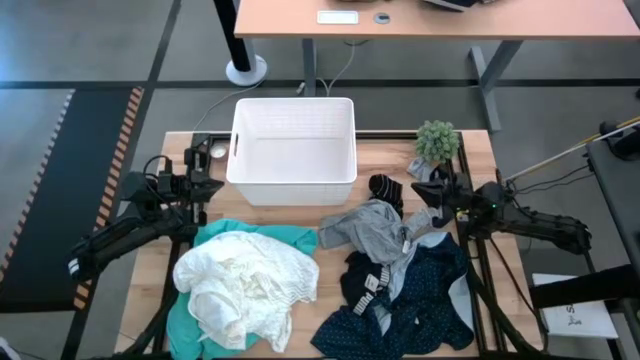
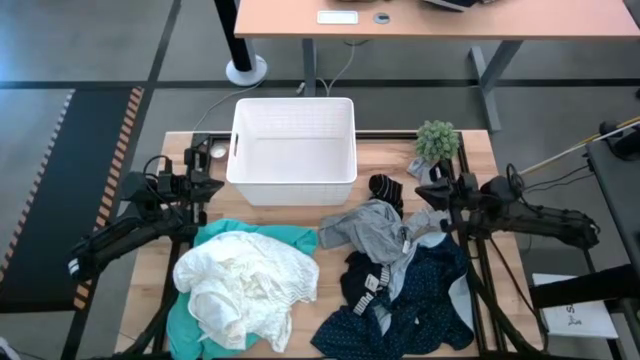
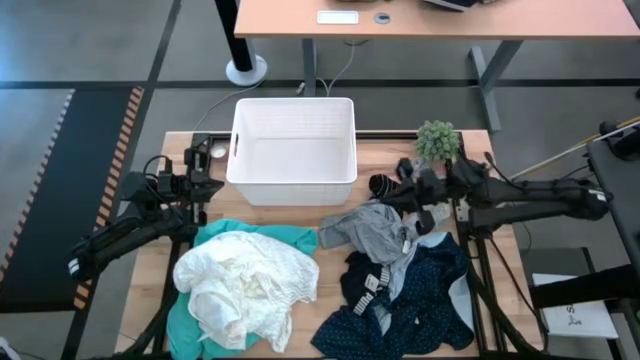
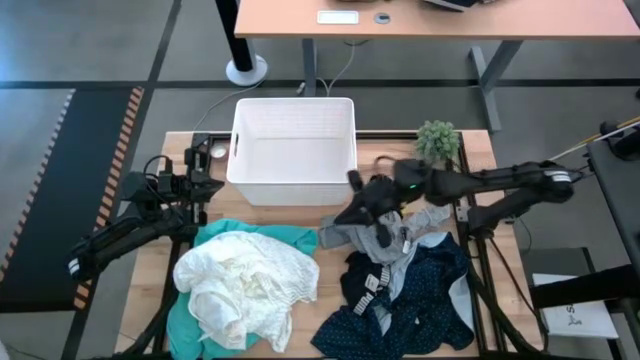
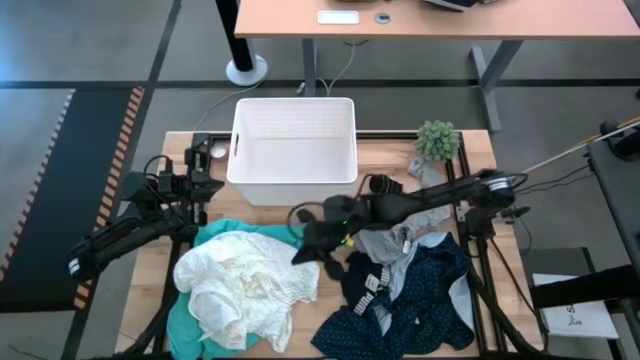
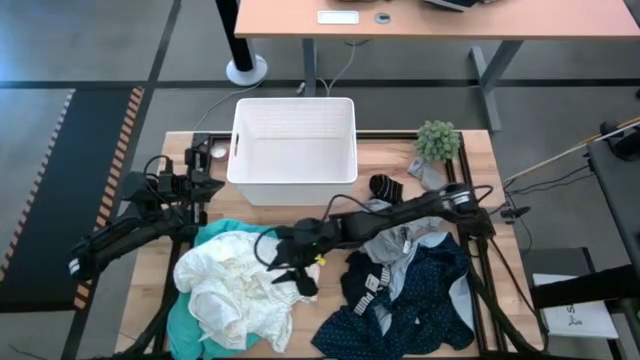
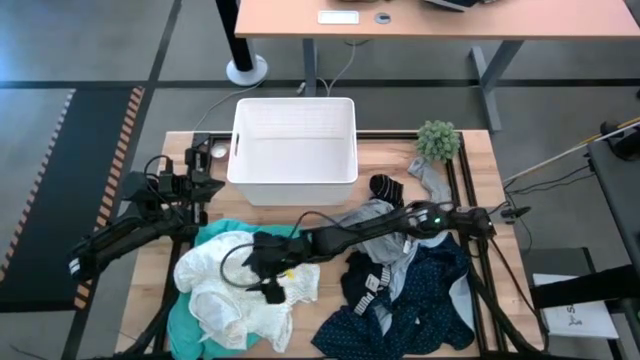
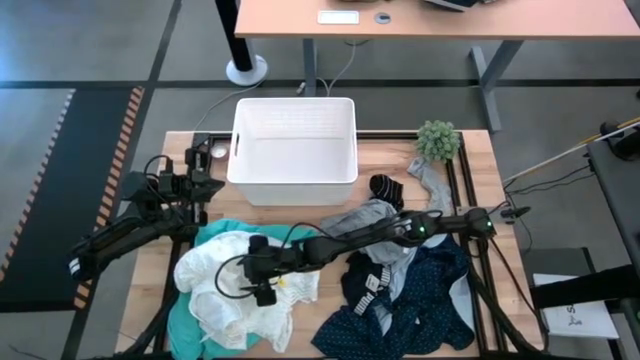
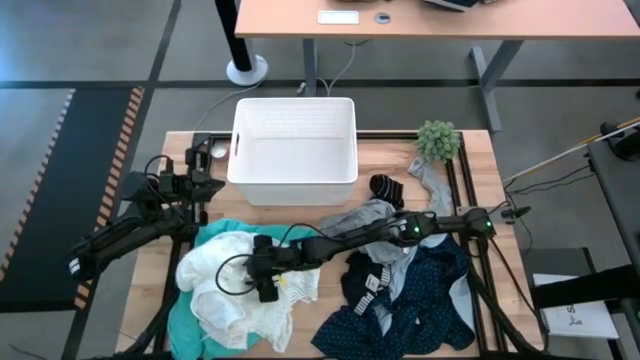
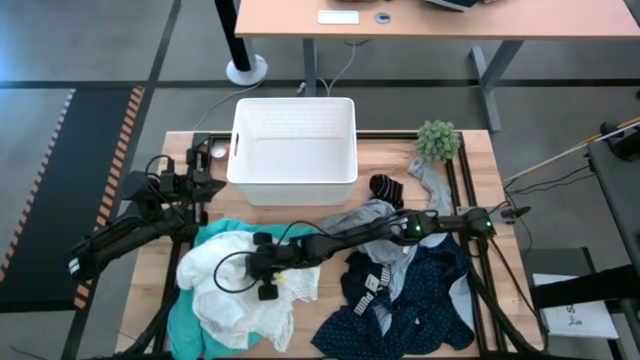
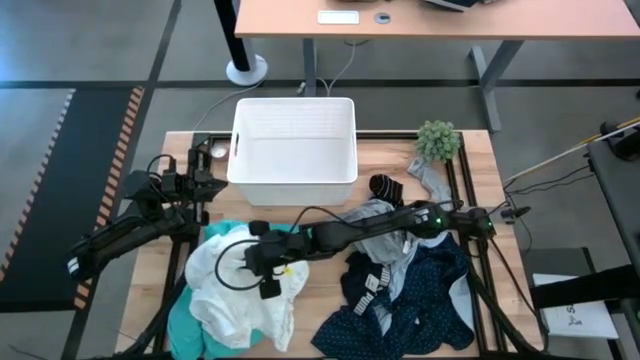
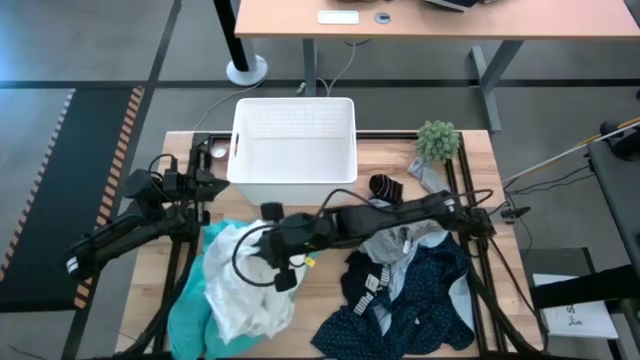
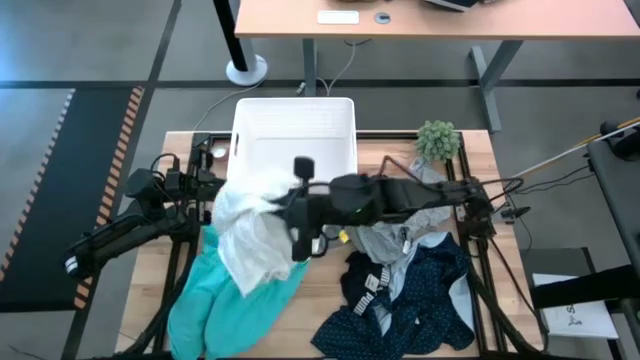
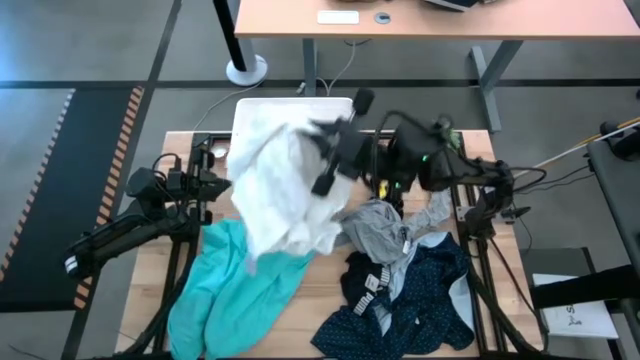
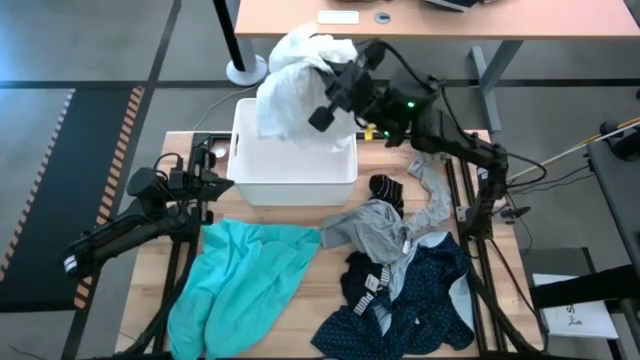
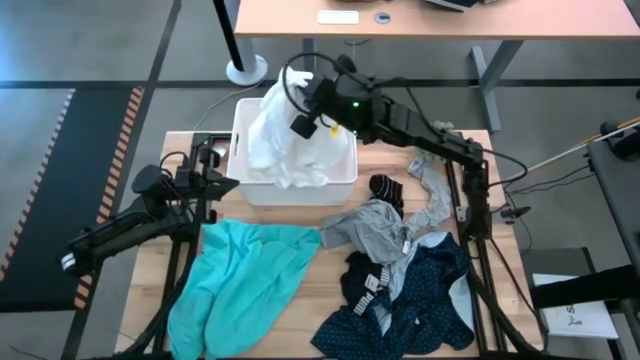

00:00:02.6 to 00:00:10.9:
Task: Sort clothes
Put the white shirt into the bin

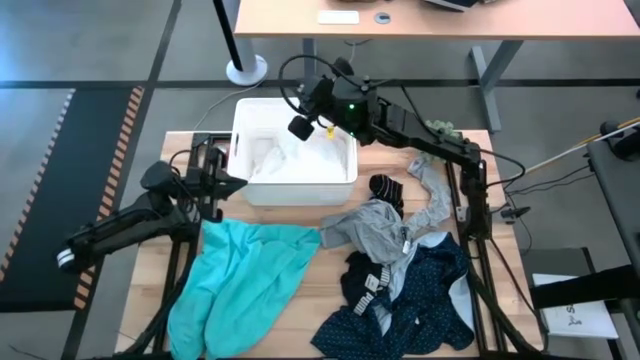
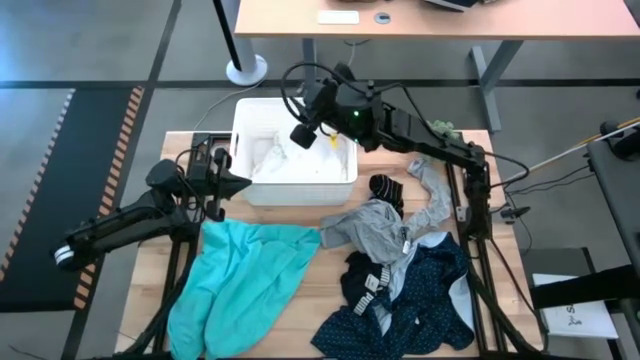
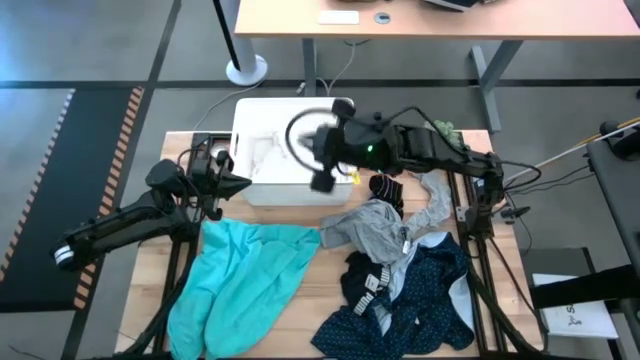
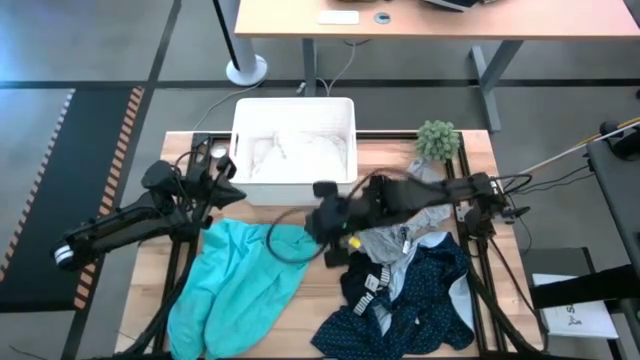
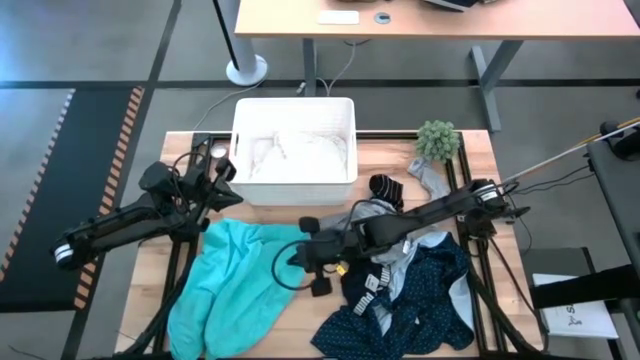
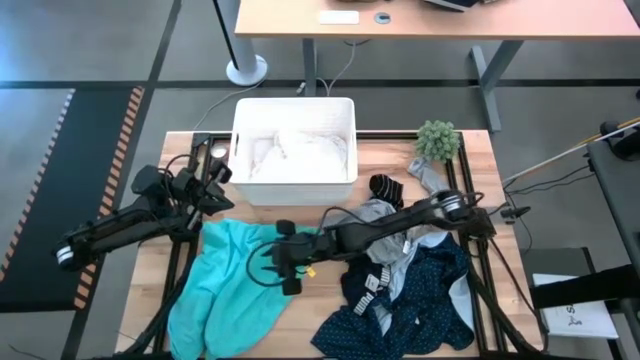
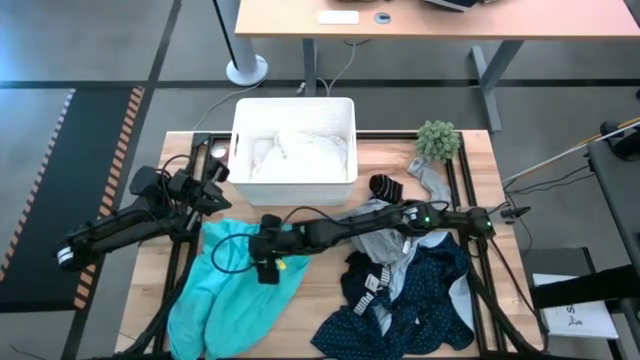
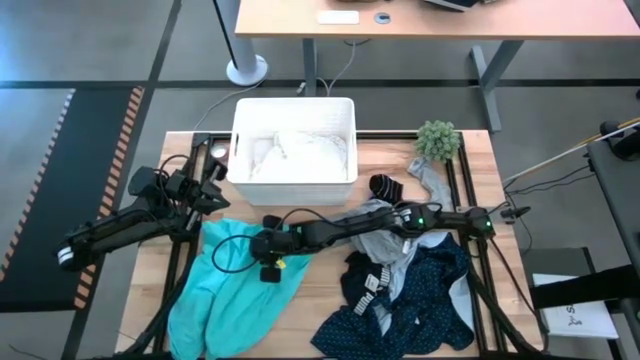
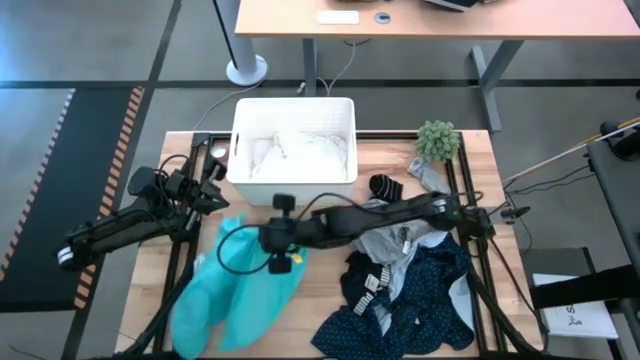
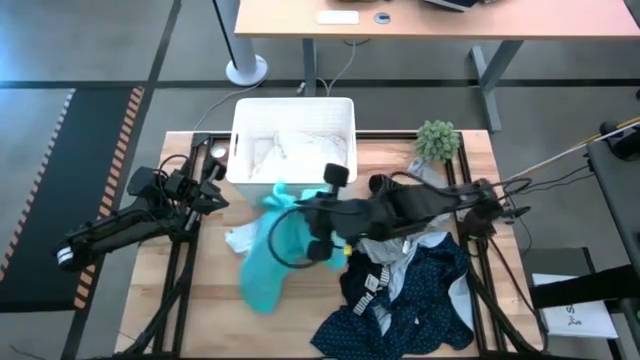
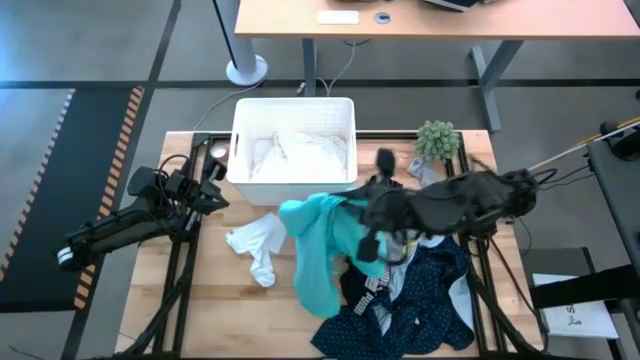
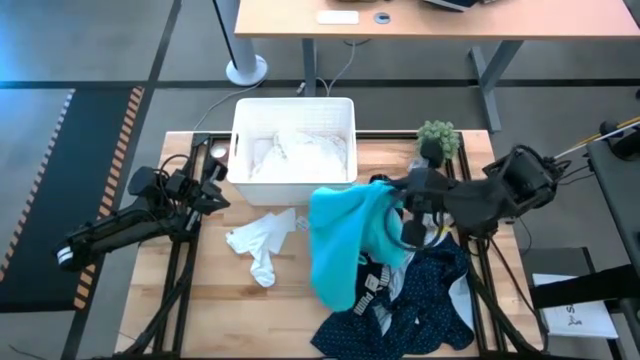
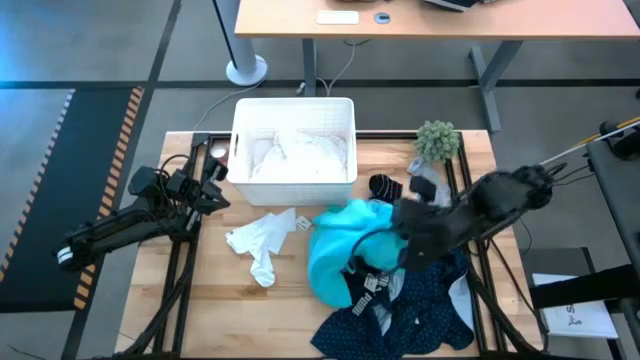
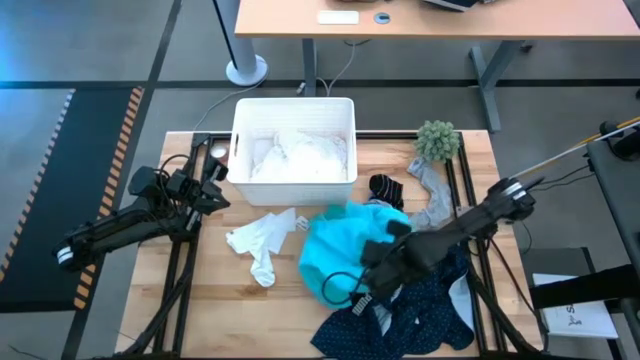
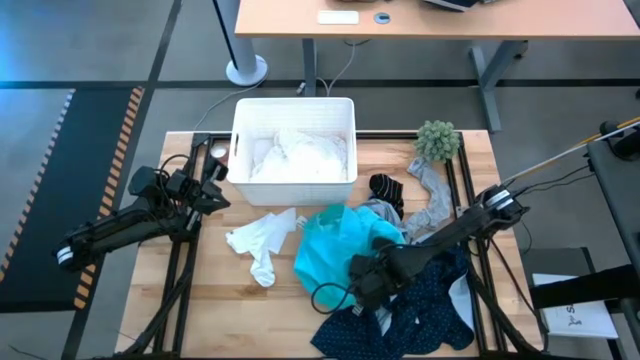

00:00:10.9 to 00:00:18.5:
Move the shorts on top of the pile of clothes

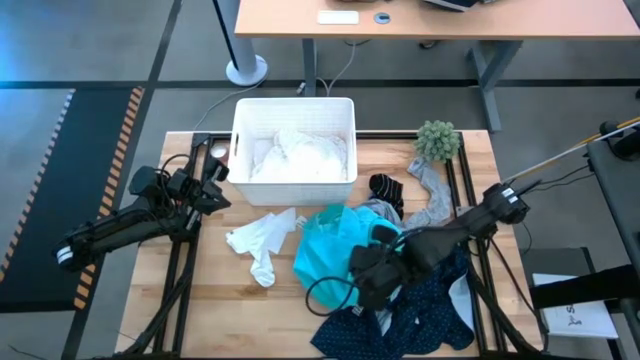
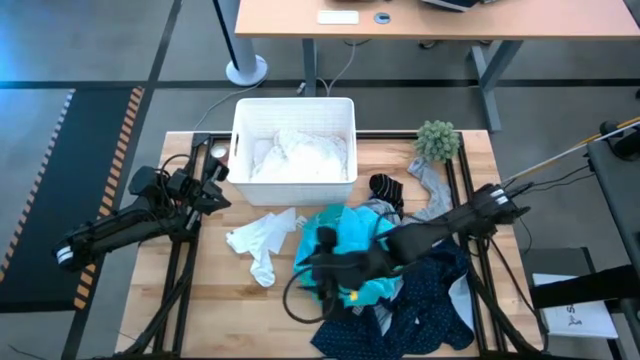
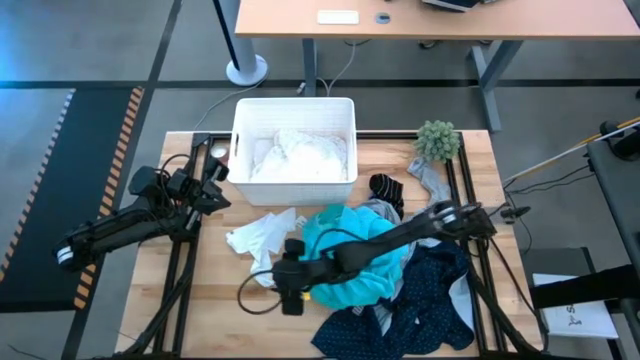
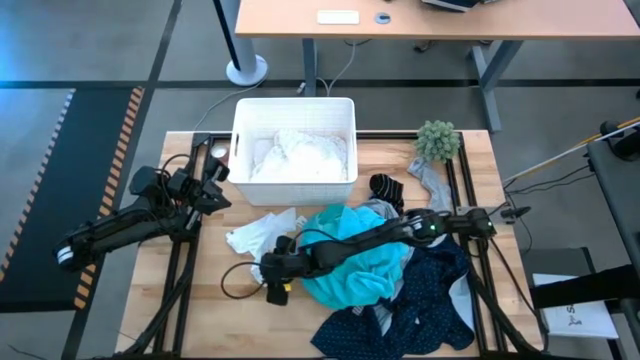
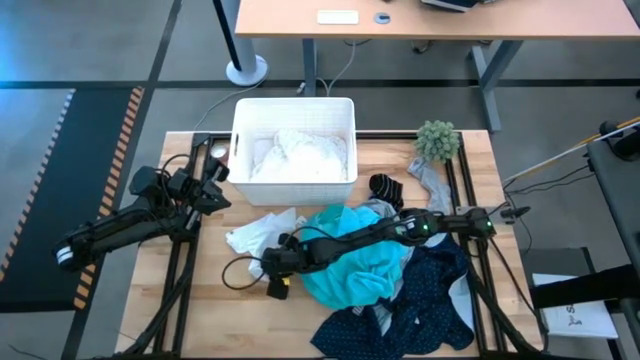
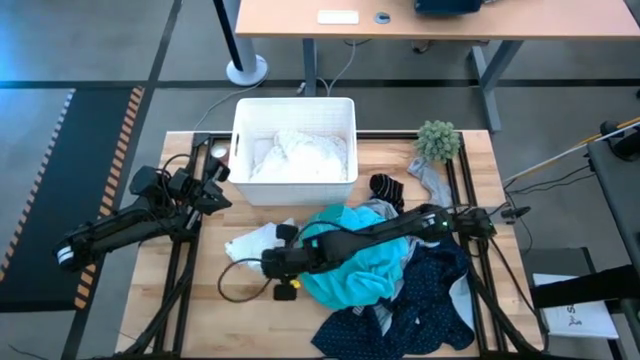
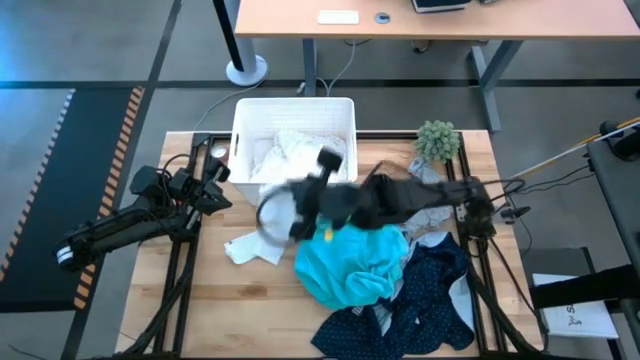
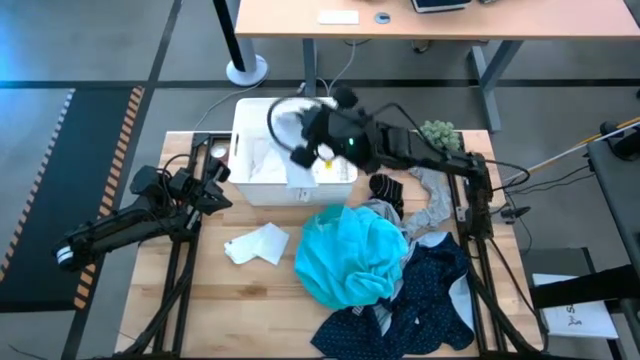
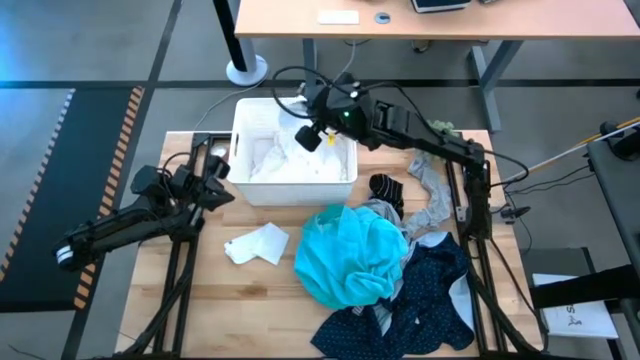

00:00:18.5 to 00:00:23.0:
Put the bottom white sock into the bin

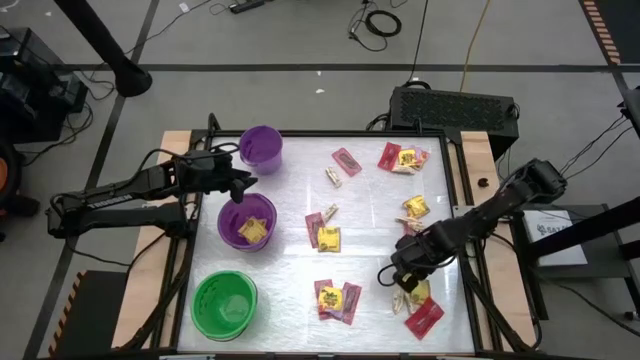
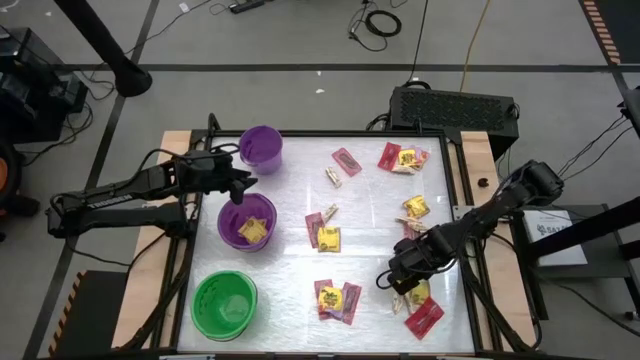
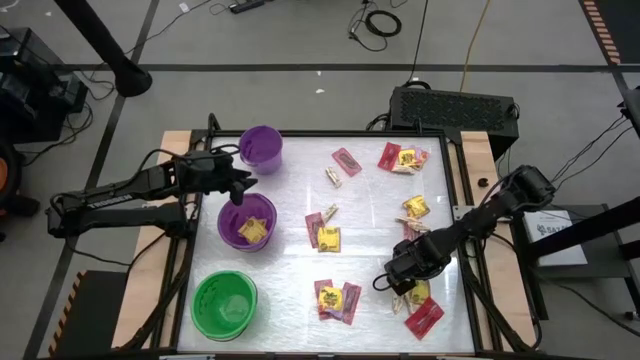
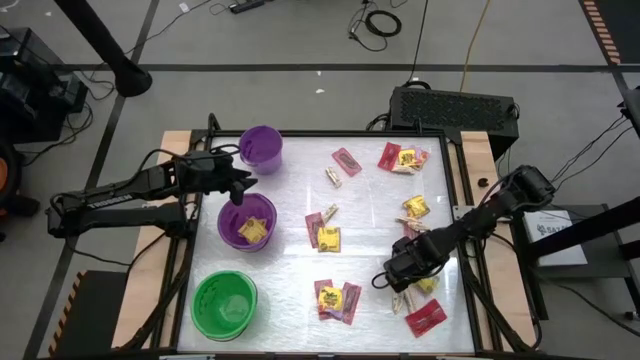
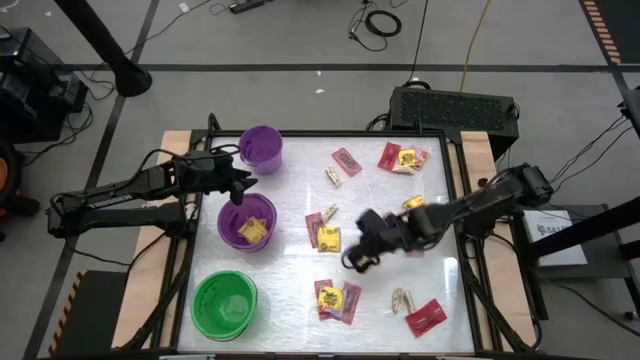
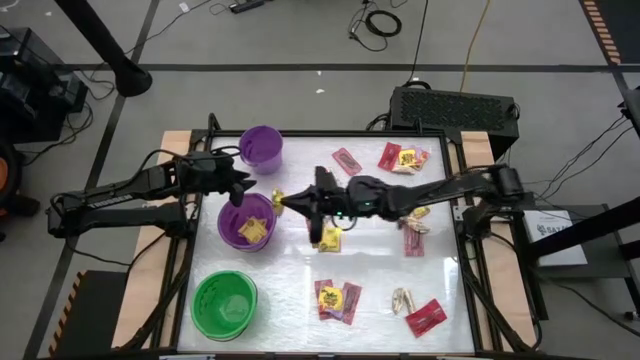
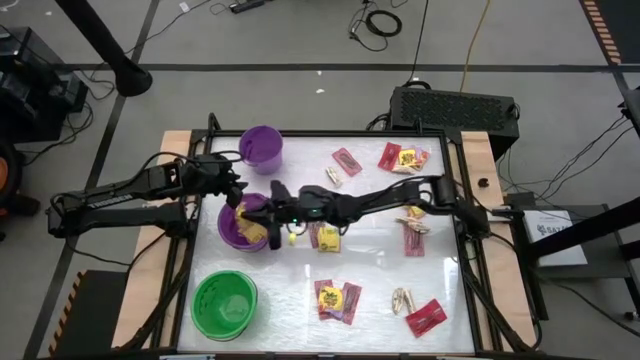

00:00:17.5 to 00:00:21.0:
Task: Sort candy by brand, put in halloween buckets
Put the yellow candy into the bottom purple bucket
